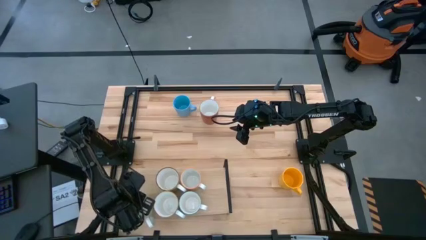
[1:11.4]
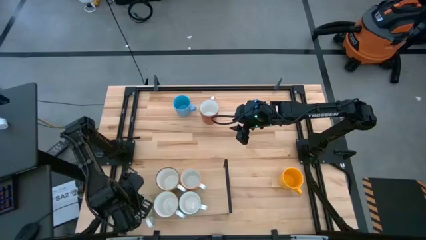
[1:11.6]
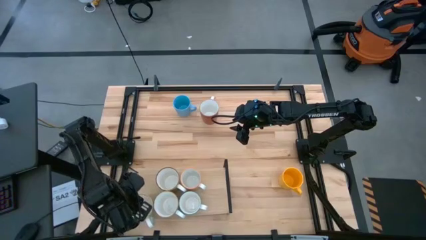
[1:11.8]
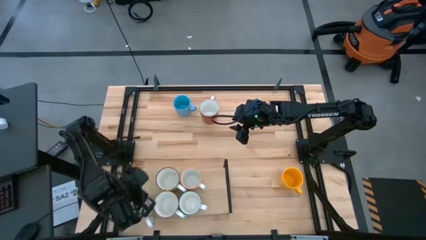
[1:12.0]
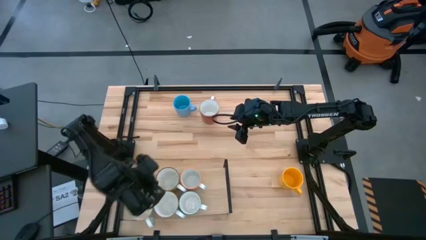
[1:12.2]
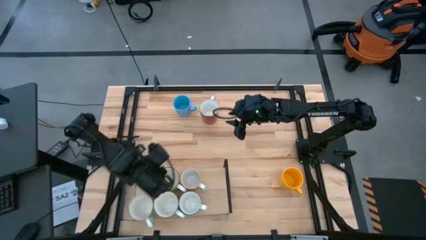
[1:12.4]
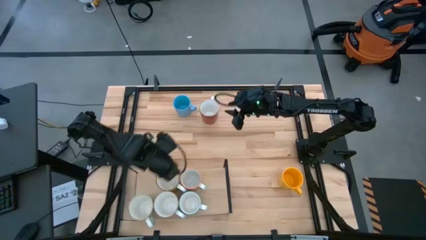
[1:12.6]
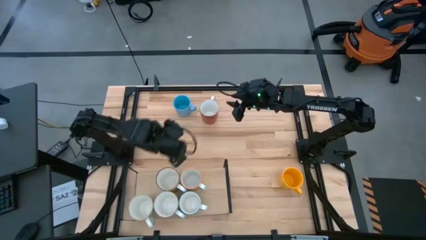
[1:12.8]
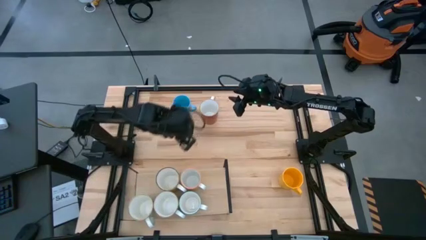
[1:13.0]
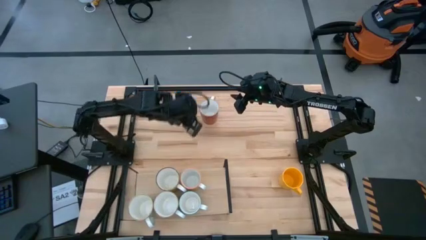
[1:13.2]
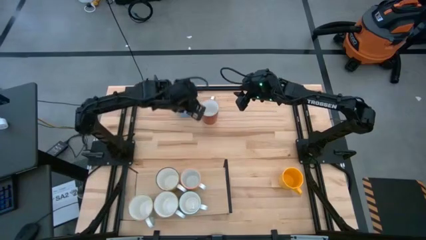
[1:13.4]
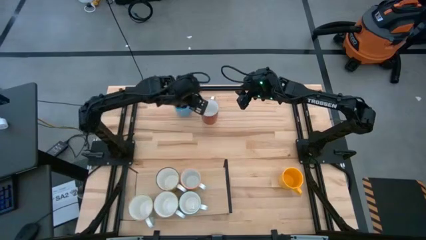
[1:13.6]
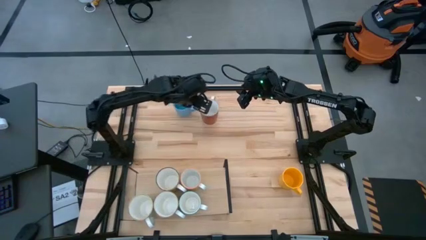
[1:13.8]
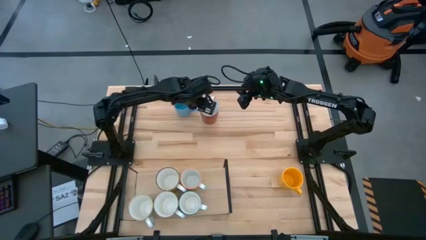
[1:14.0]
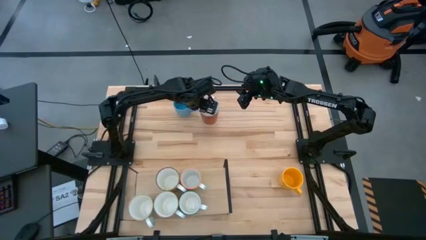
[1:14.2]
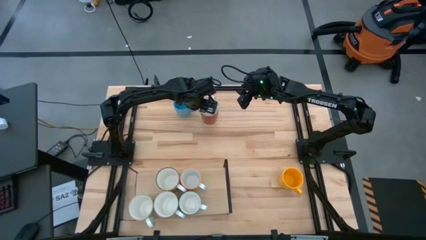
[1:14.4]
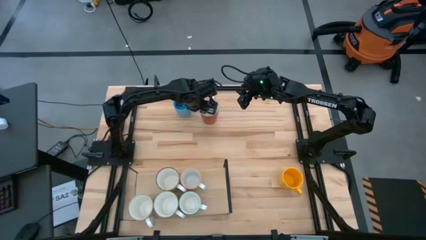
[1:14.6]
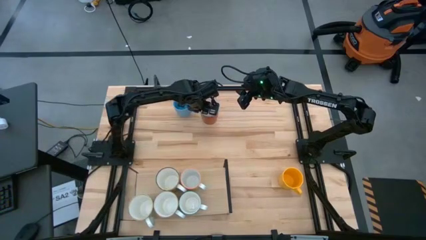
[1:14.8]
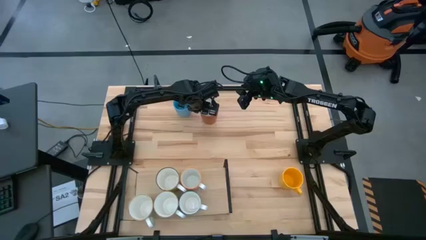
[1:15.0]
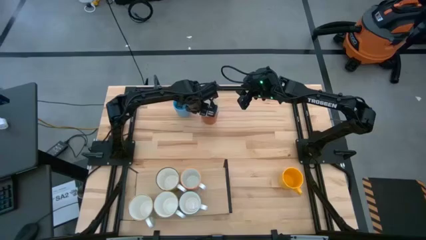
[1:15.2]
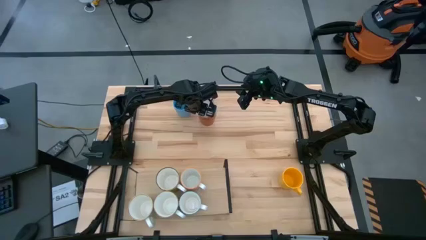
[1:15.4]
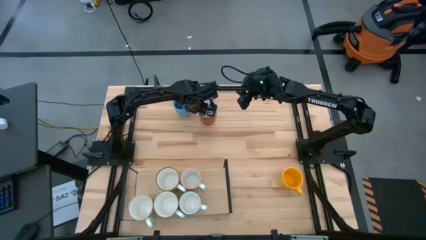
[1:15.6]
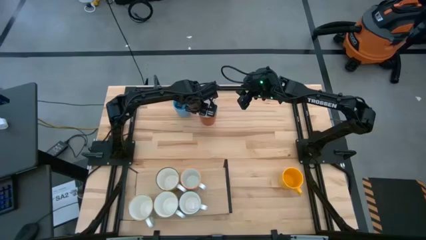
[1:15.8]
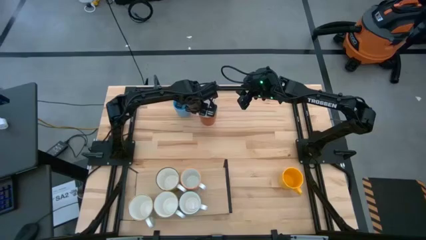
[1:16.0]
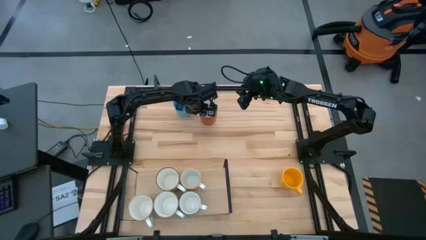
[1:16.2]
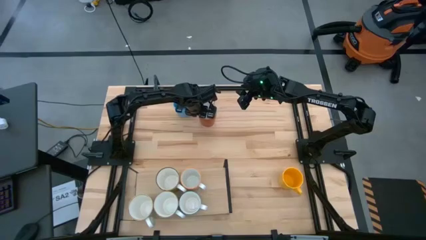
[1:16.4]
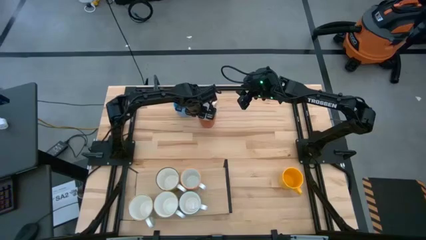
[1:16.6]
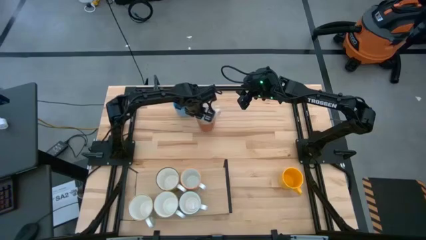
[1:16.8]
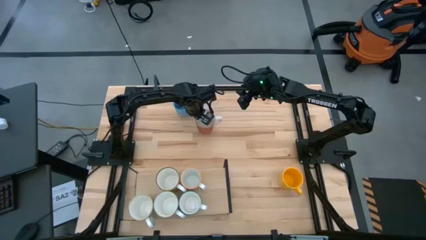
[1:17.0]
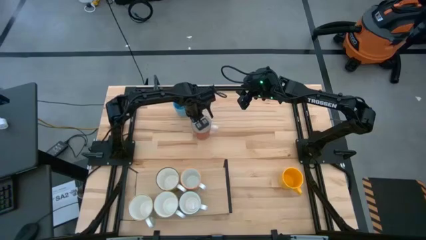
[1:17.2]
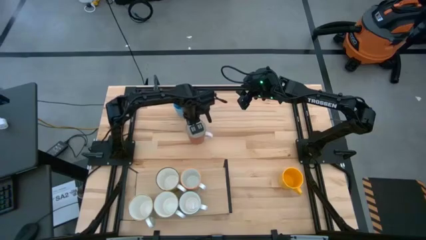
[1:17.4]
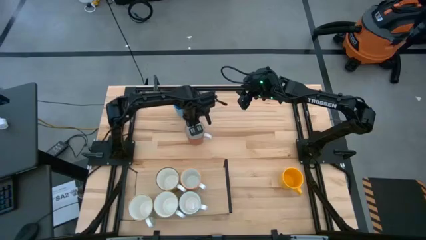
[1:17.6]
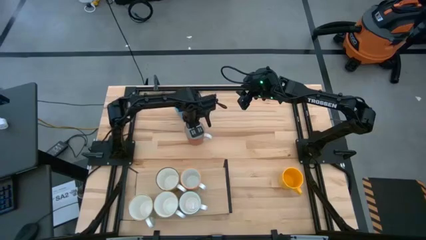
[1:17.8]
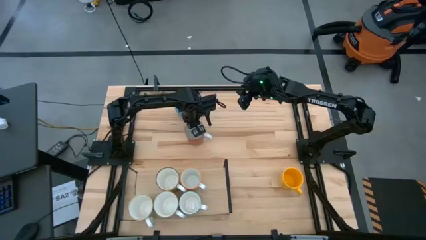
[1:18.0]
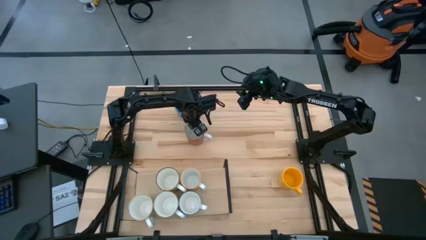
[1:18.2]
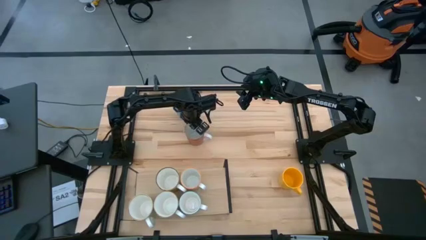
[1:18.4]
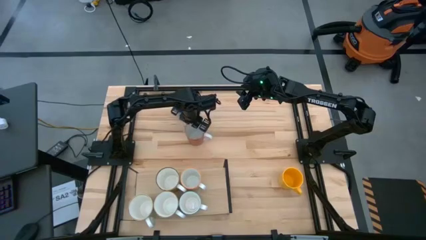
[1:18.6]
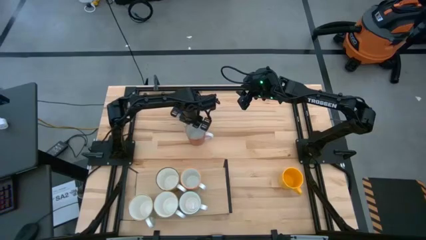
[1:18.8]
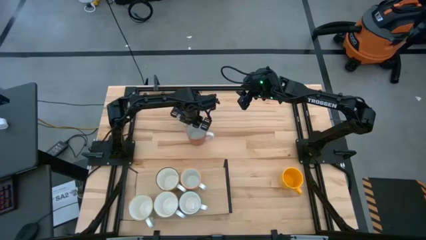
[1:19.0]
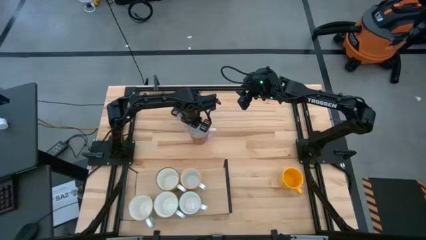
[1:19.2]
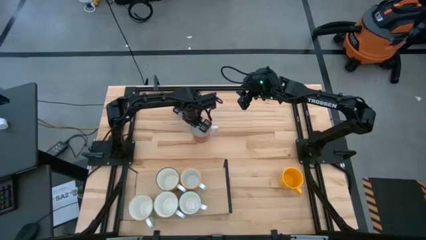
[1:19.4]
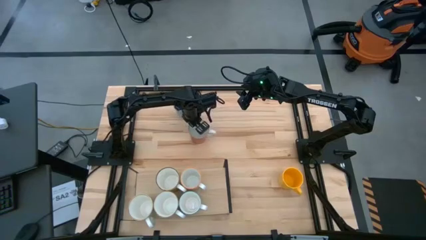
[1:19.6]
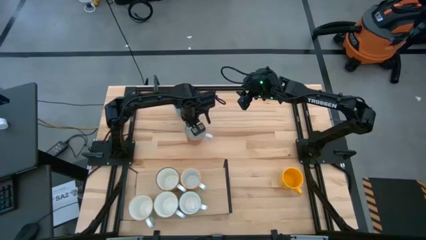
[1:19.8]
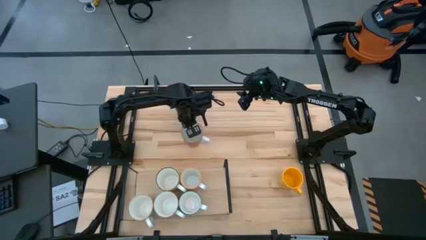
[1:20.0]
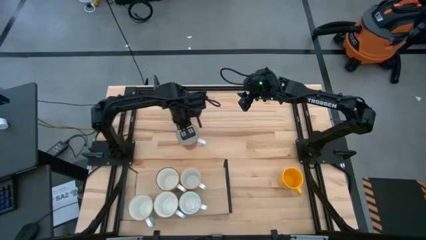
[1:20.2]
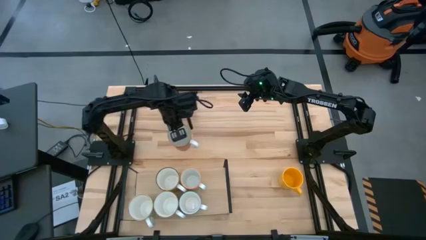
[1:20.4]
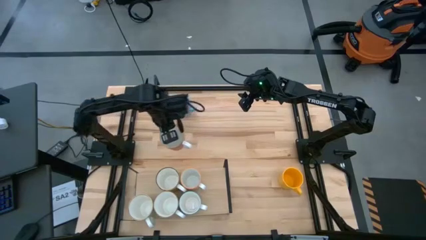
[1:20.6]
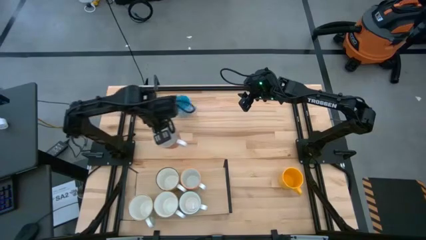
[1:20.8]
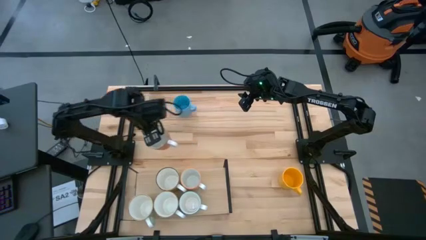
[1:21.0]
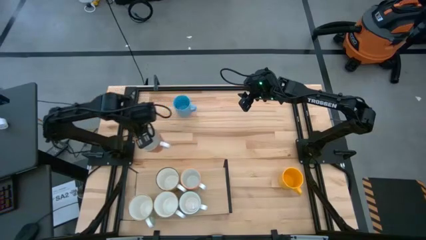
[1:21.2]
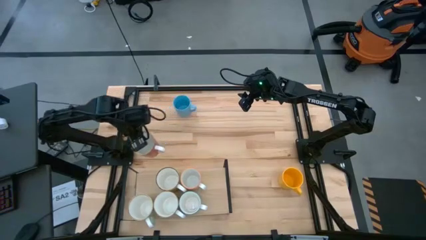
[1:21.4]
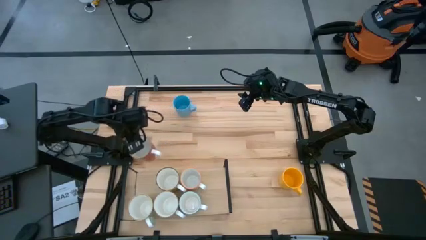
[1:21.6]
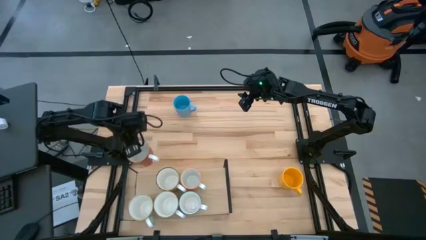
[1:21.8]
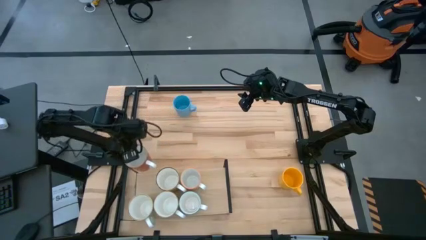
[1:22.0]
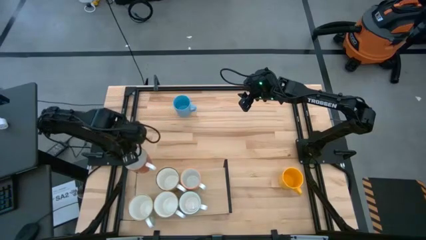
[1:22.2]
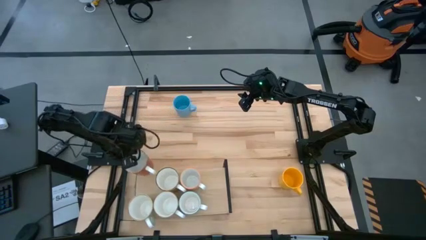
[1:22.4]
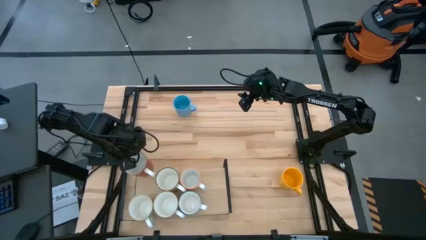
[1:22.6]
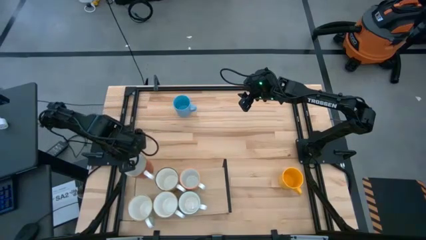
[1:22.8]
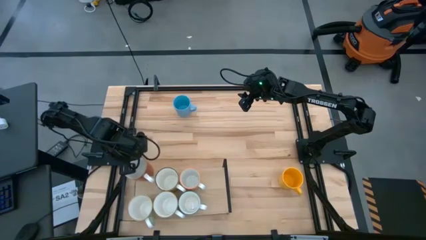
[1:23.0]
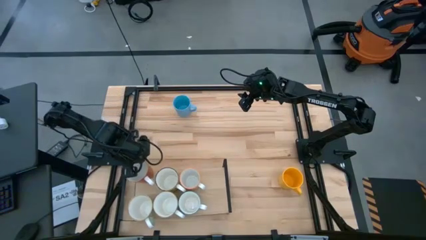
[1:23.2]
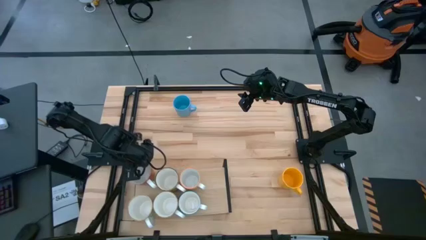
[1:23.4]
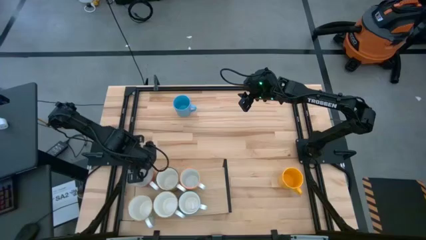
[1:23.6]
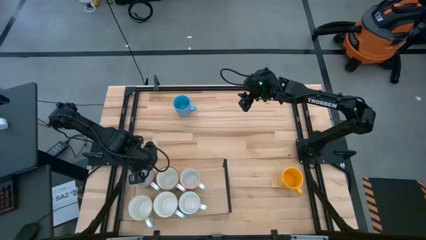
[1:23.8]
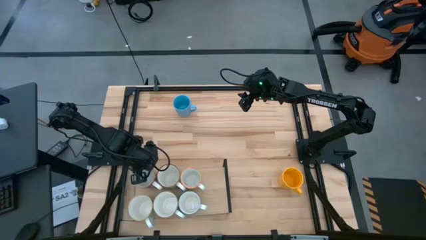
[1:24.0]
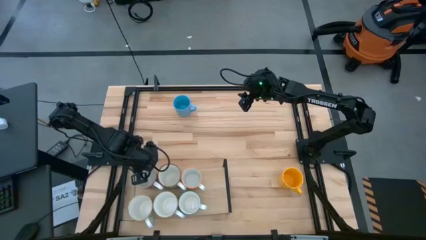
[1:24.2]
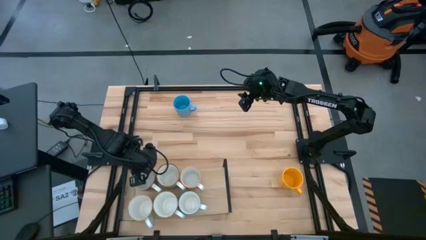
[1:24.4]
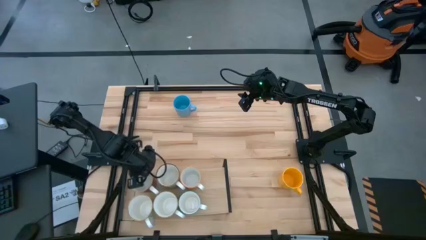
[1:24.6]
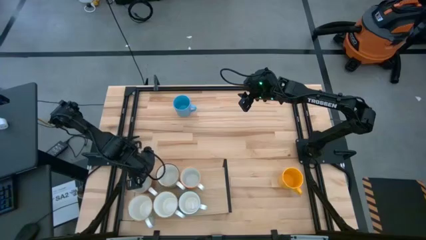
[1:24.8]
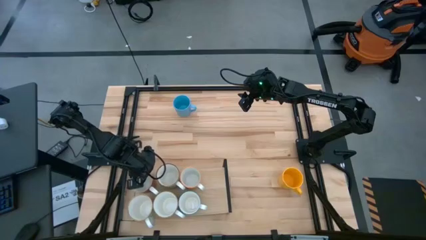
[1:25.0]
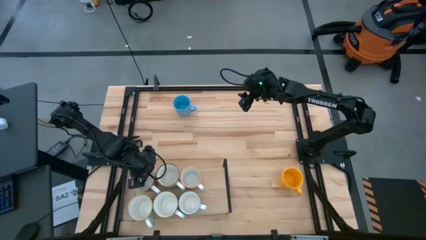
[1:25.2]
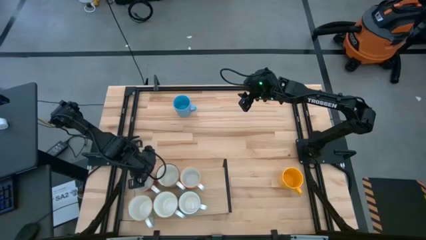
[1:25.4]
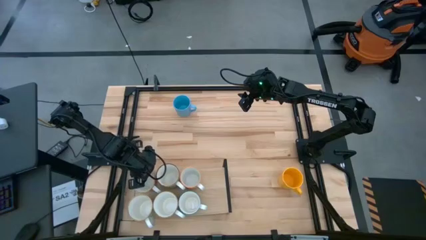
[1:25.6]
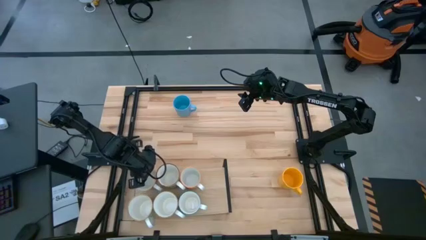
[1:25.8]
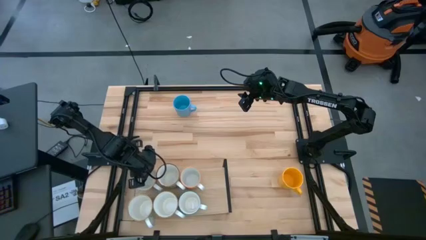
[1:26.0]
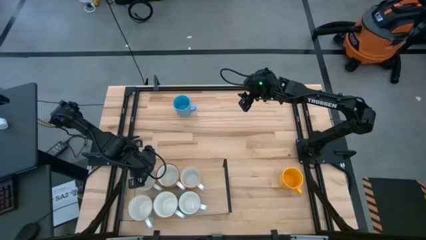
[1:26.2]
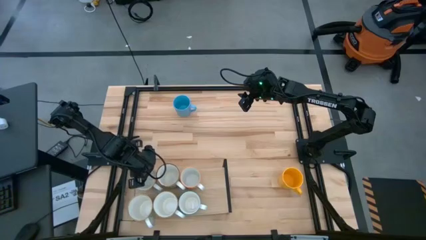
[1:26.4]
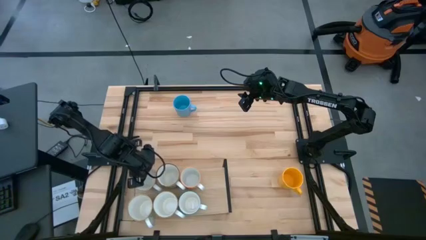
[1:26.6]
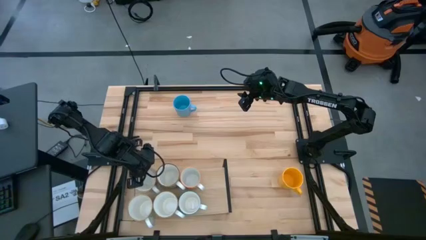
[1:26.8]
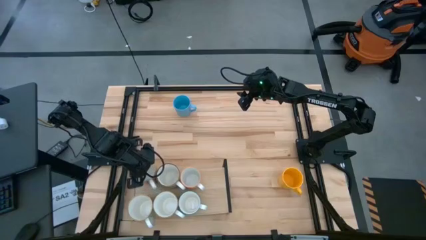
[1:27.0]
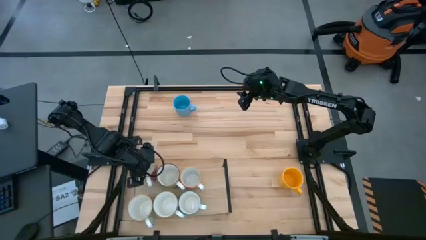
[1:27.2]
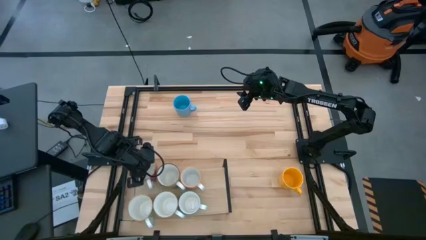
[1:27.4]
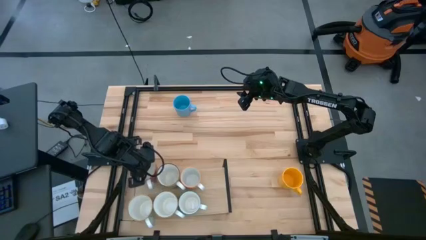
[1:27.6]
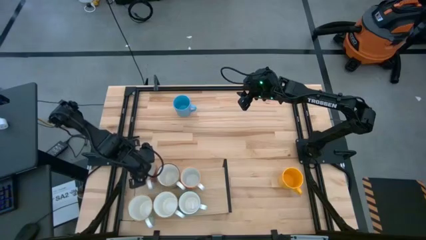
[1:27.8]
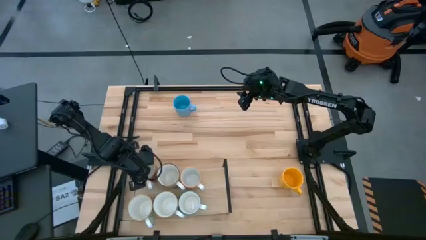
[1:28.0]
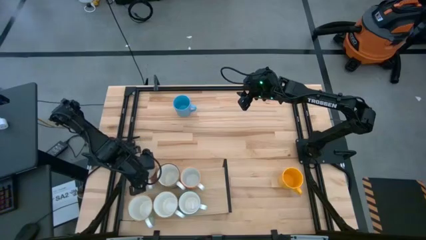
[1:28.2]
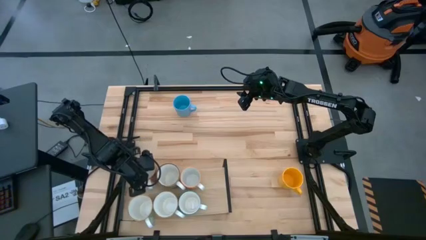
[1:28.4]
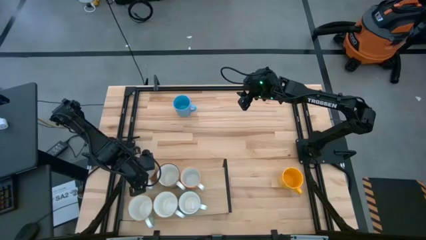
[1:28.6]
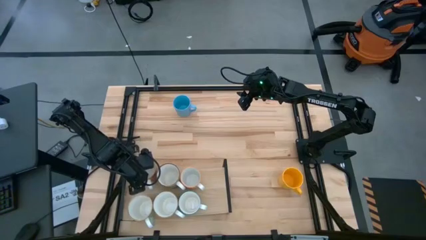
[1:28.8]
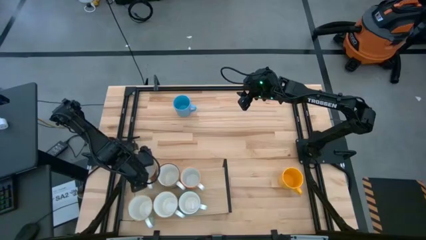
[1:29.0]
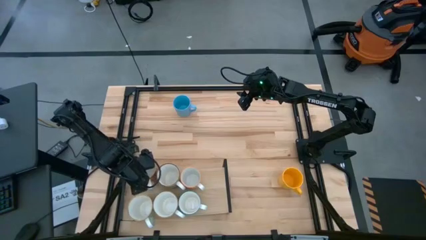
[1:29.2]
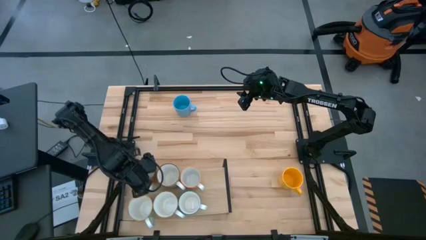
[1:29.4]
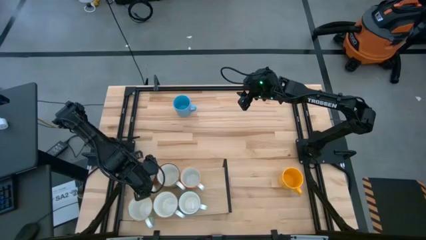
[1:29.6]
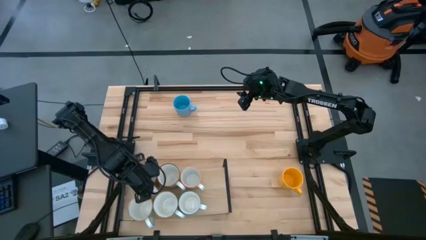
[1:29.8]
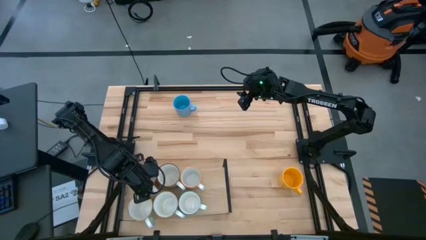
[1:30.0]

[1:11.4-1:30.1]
Task: Place coffee mugs
Put the orange mug on the shelf
